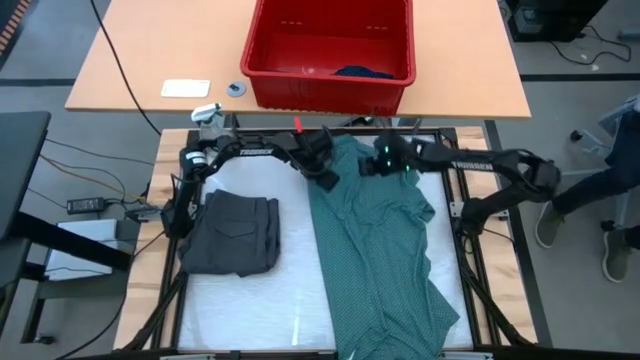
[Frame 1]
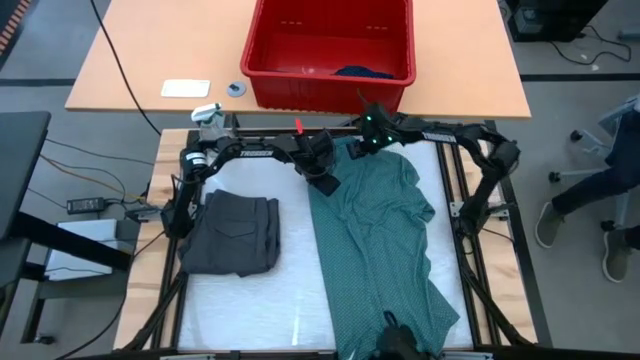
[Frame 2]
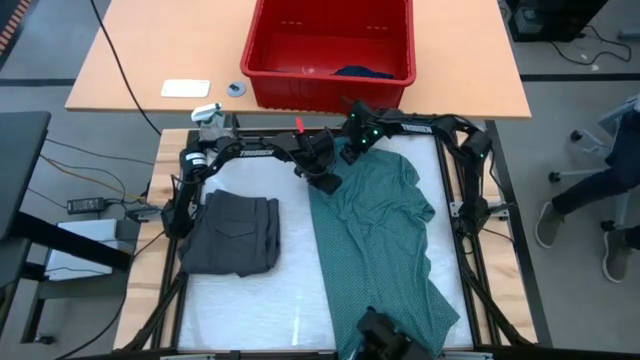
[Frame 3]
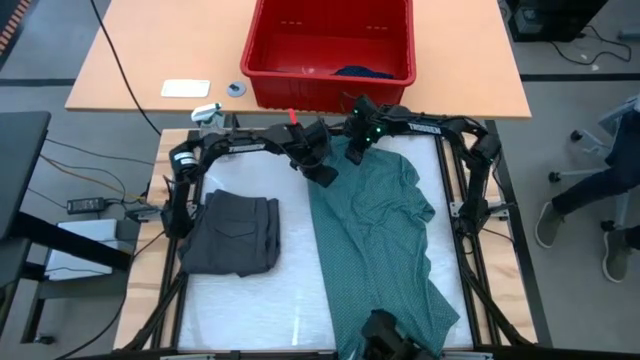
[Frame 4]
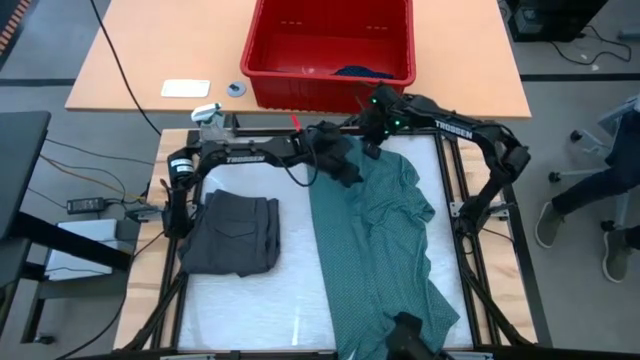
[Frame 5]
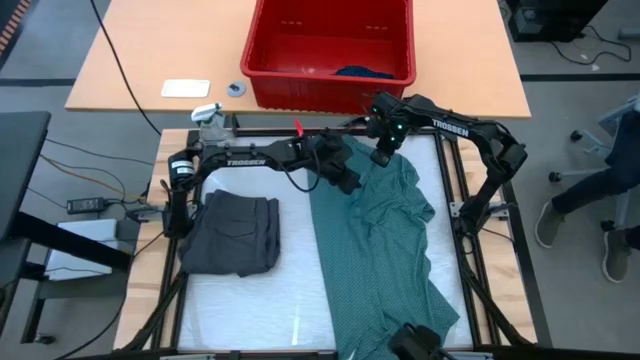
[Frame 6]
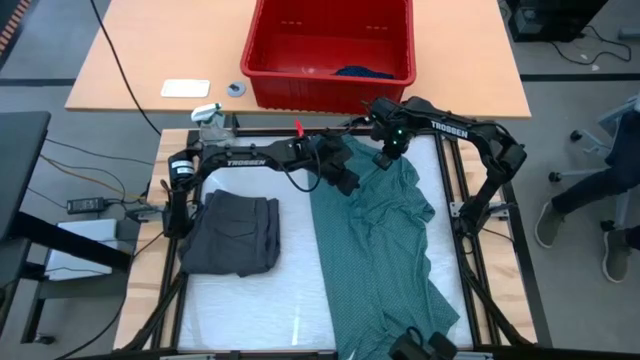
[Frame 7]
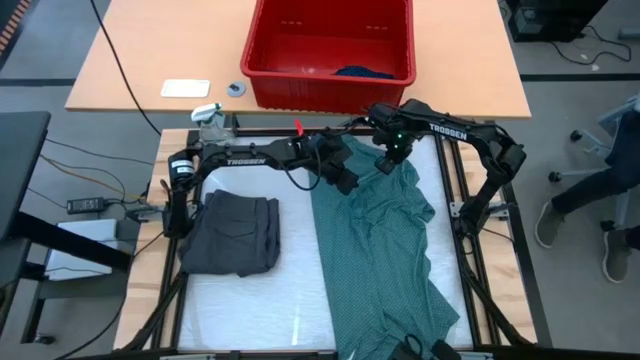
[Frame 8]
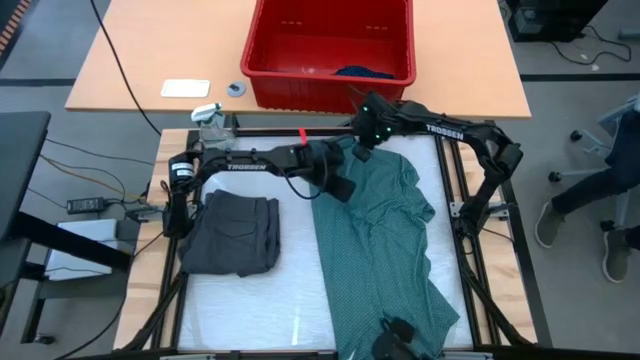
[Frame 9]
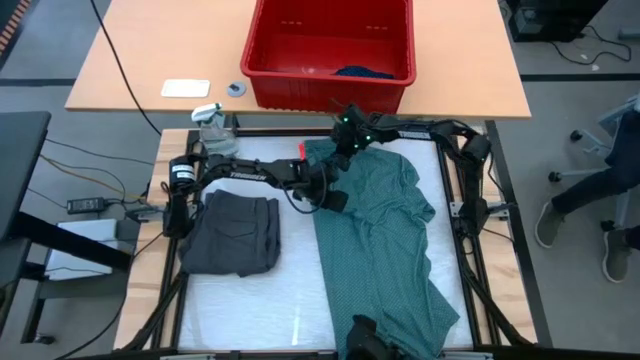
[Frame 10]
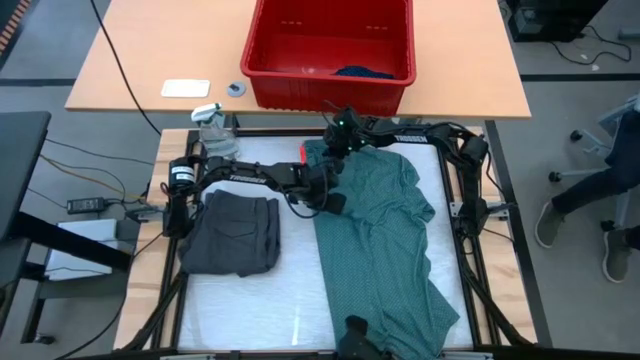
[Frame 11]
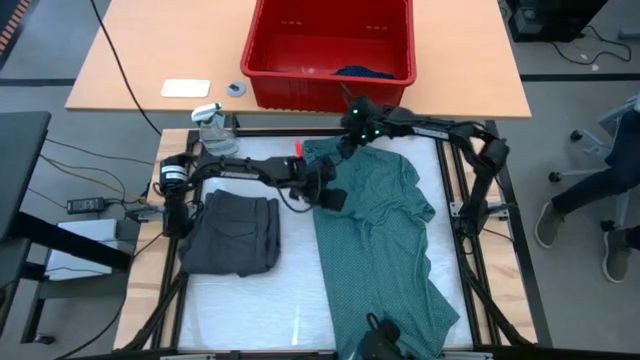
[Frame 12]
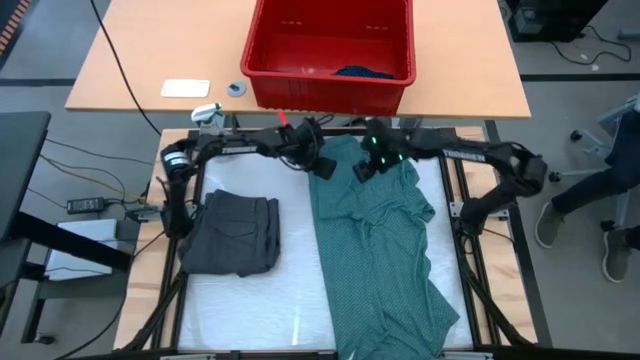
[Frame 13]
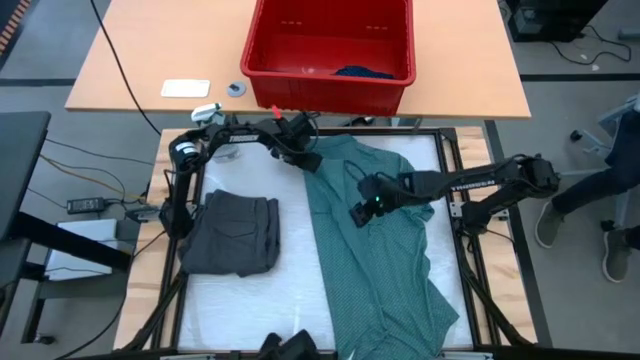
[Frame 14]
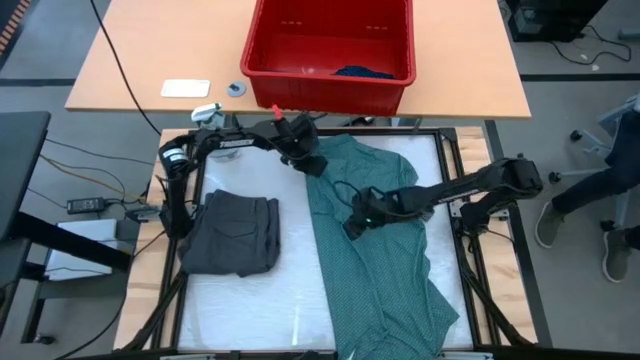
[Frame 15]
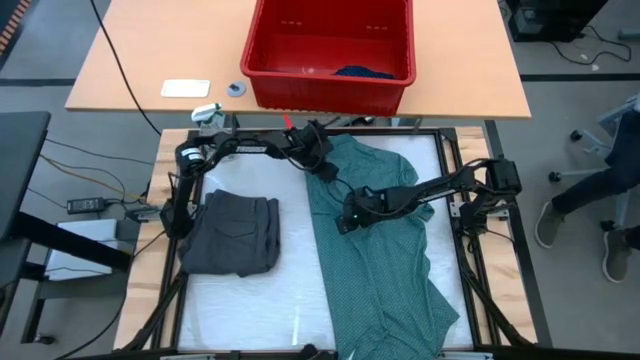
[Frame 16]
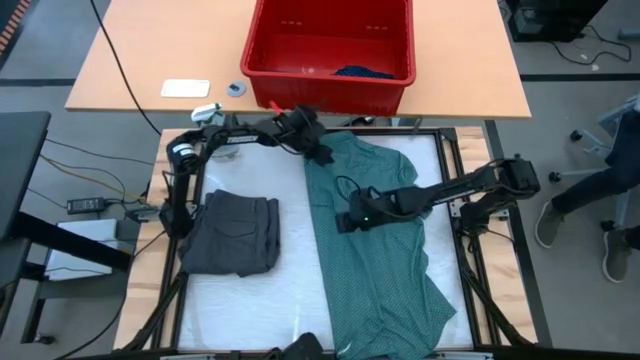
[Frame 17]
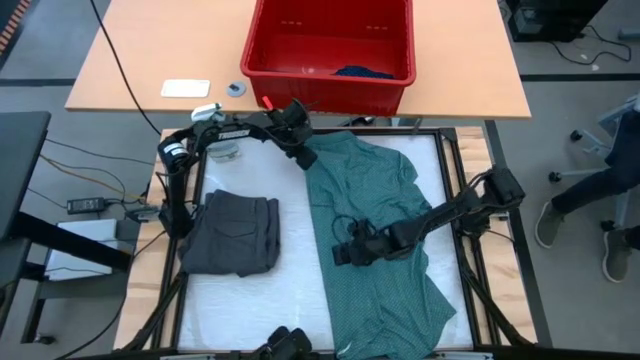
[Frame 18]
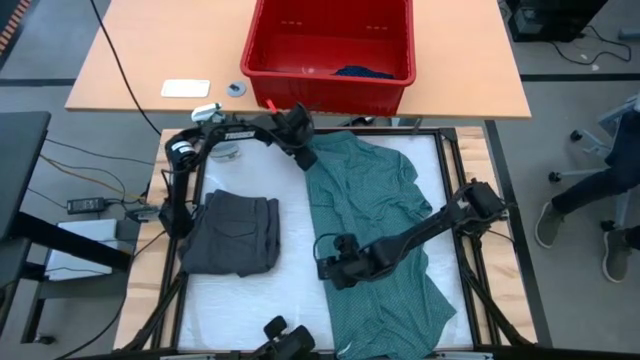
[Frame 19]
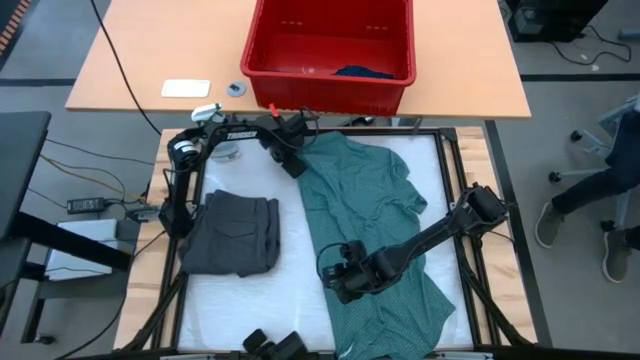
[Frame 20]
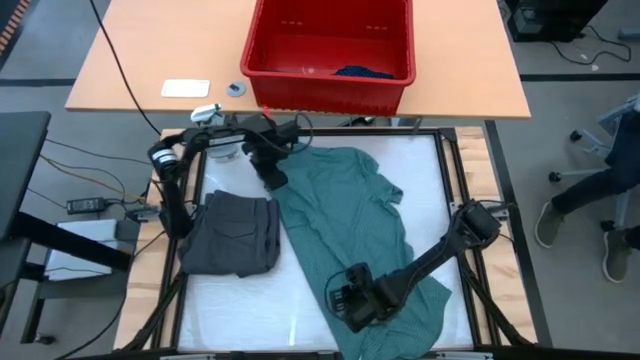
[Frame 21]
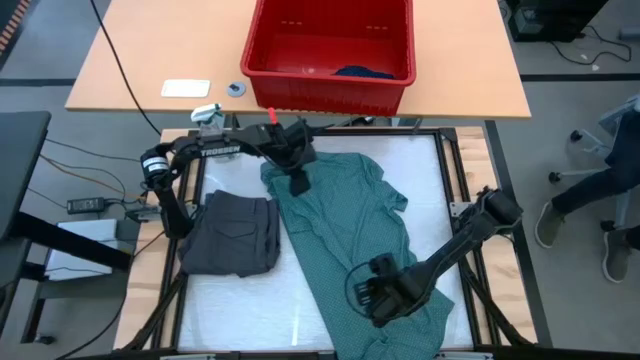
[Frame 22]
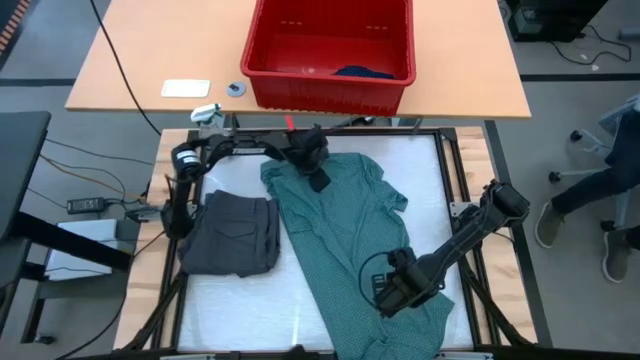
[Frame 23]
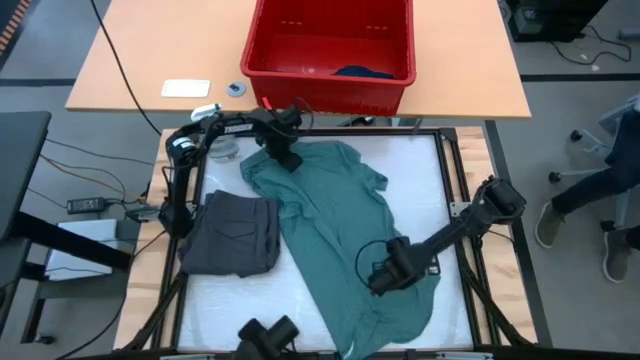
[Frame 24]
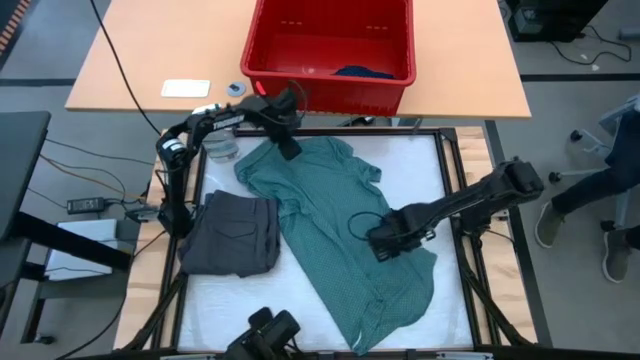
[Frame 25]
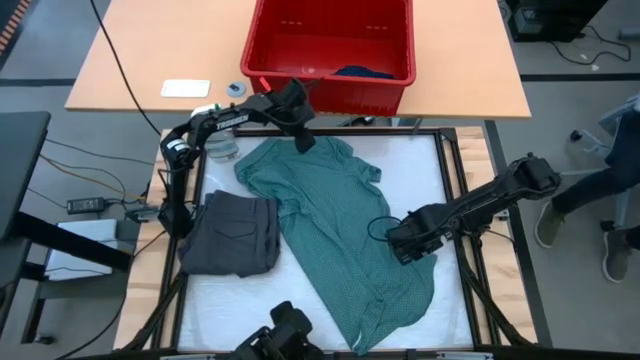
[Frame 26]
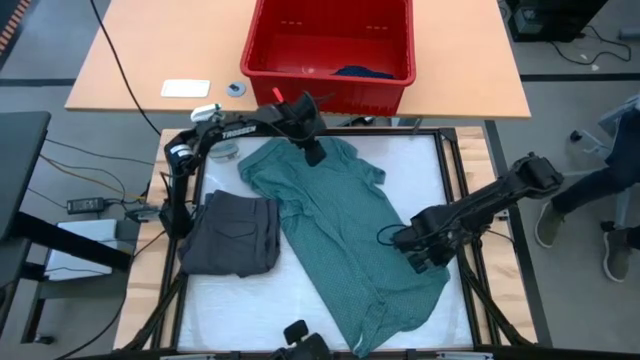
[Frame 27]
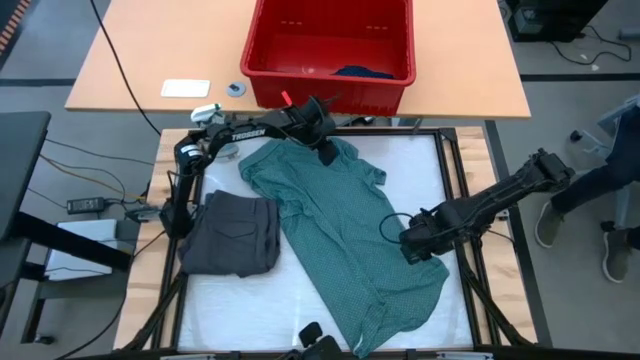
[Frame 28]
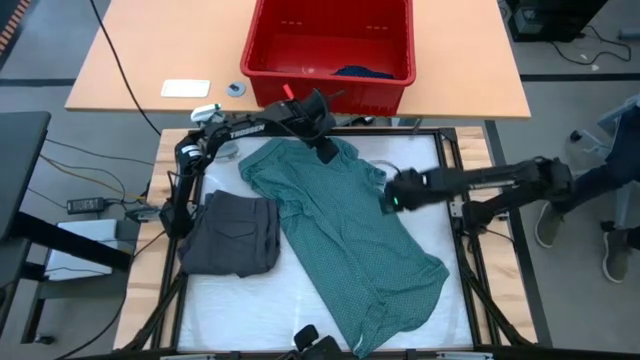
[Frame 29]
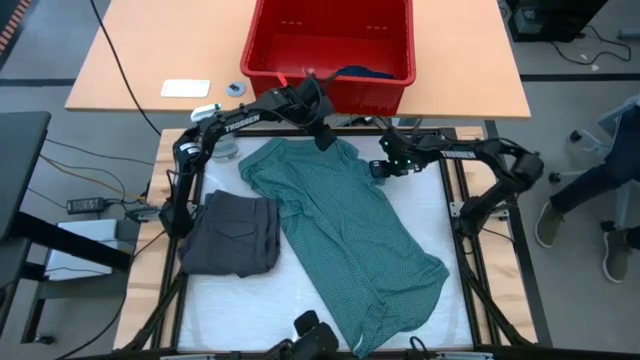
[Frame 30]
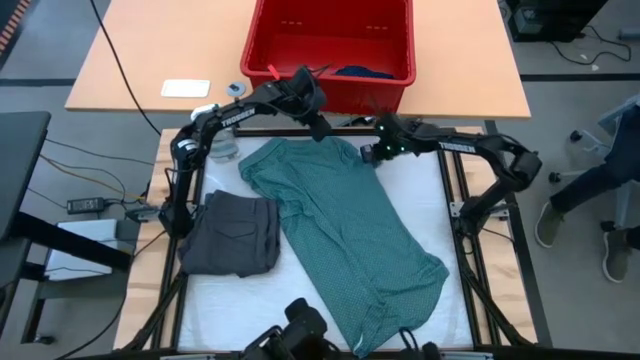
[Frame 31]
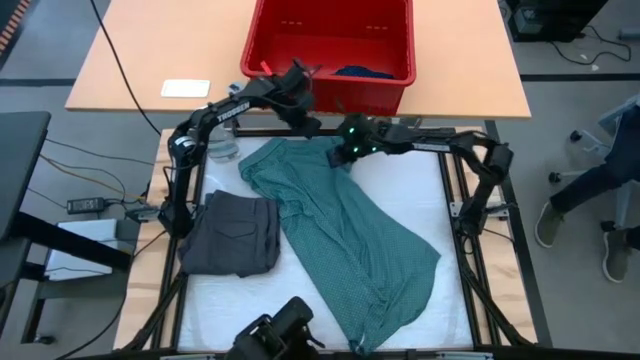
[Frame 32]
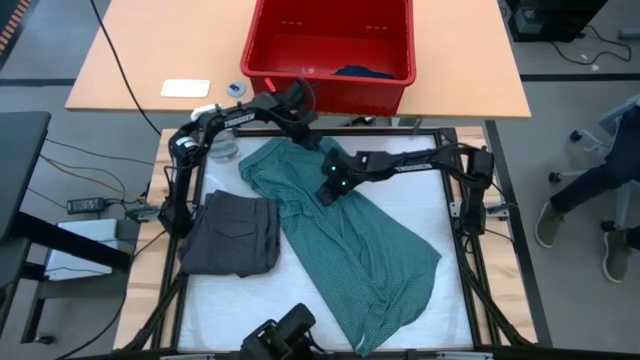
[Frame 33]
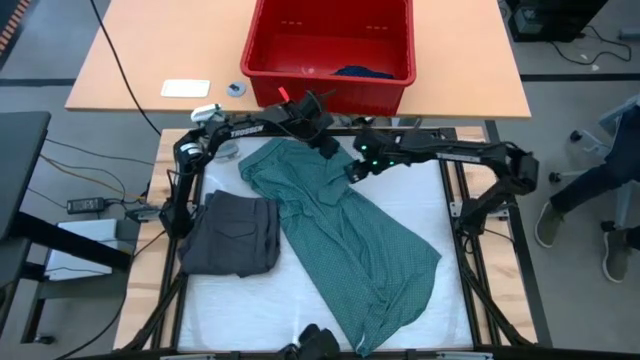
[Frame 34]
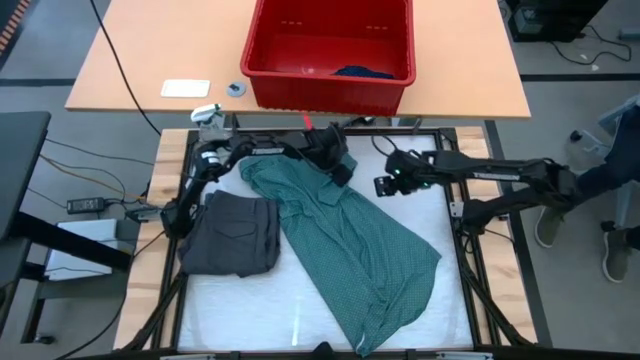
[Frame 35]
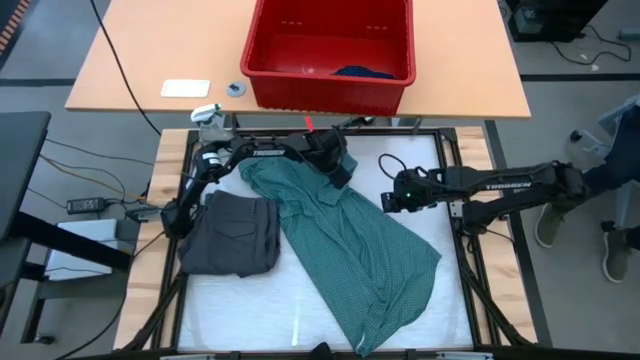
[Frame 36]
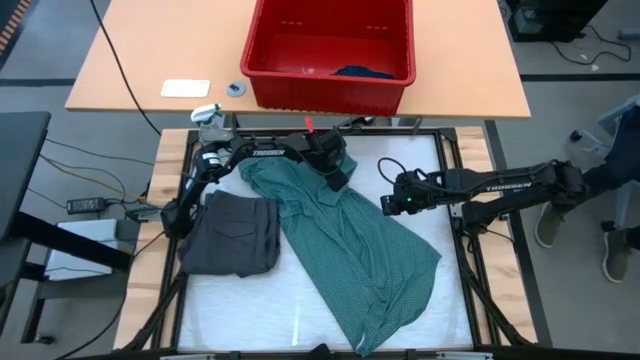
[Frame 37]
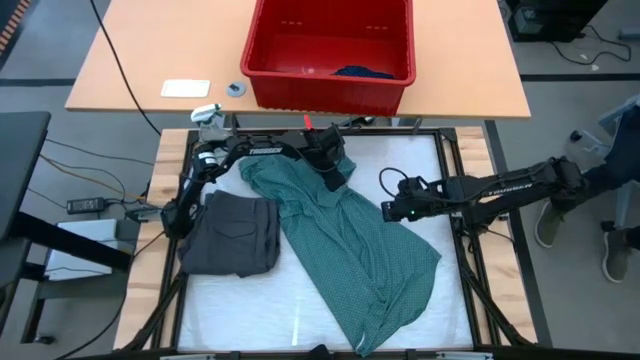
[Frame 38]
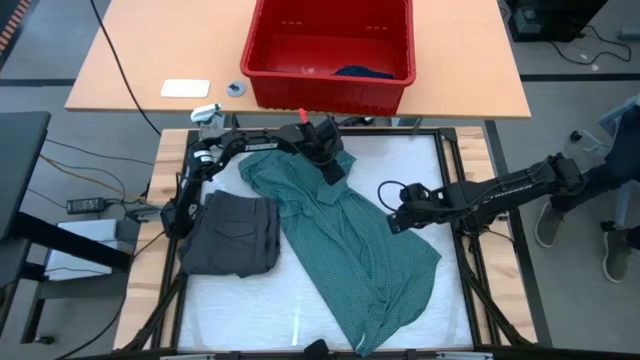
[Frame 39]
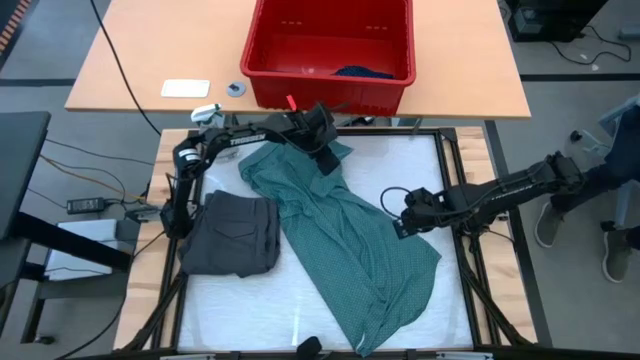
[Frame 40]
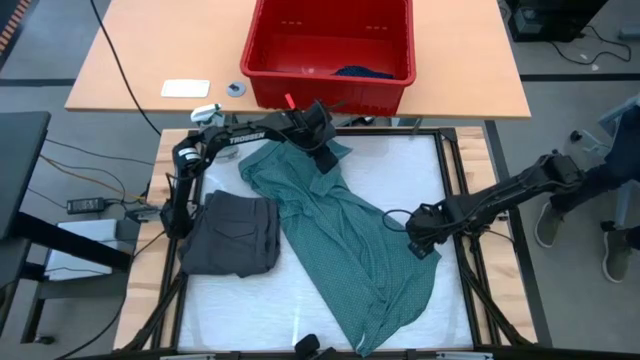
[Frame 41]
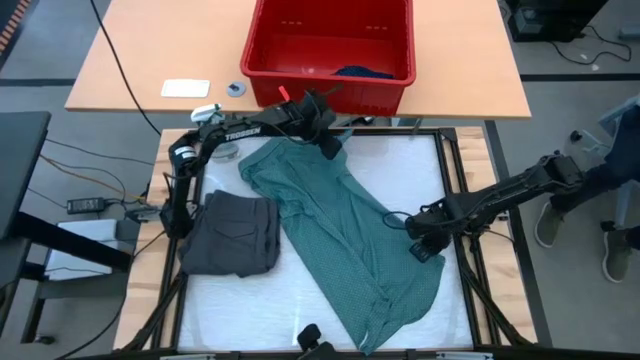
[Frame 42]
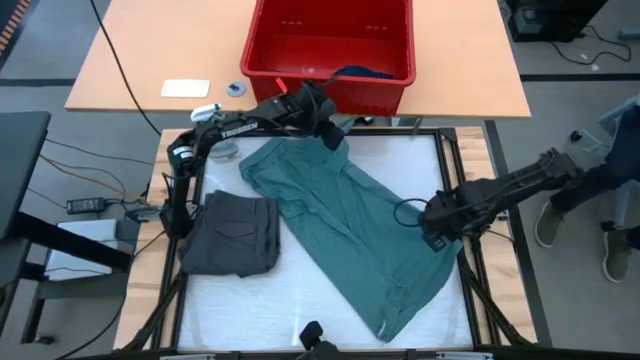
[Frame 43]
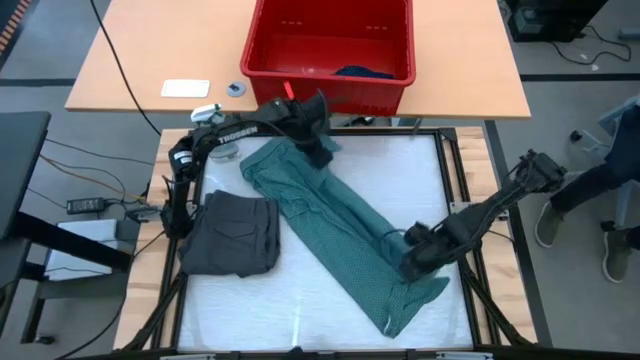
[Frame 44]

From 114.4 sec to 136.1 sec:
Task: Fold Laundry from Bin
Fold the green polo shirt on the table
